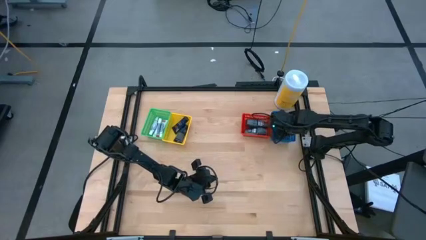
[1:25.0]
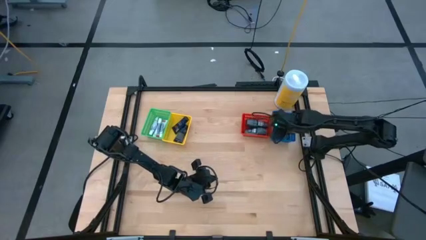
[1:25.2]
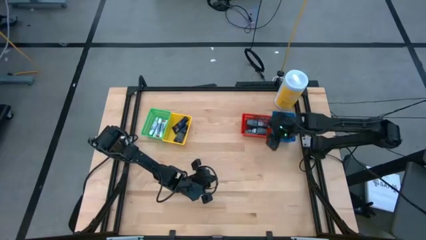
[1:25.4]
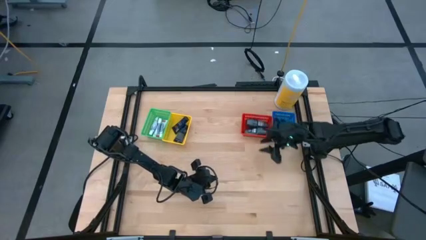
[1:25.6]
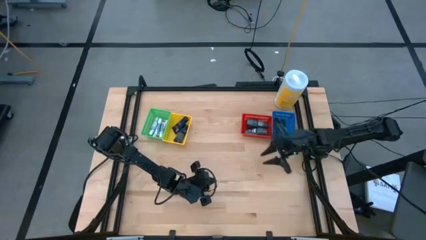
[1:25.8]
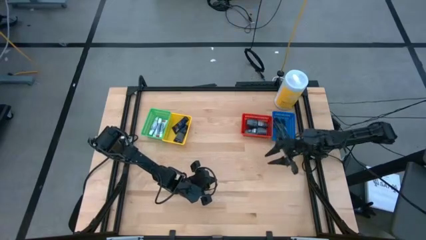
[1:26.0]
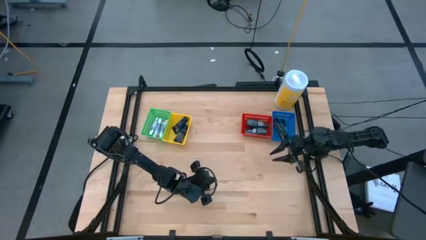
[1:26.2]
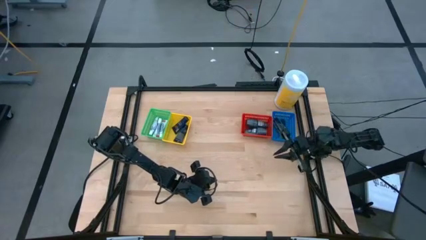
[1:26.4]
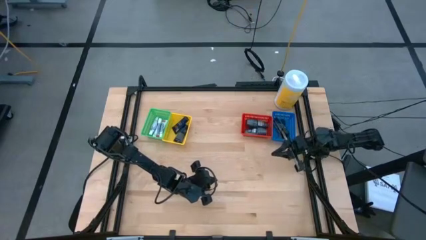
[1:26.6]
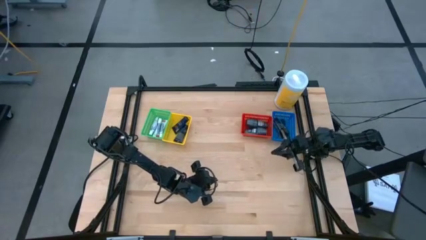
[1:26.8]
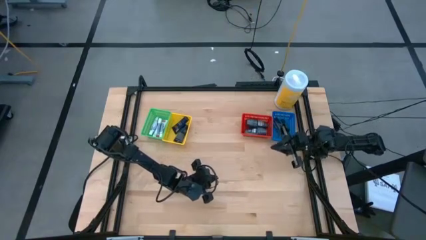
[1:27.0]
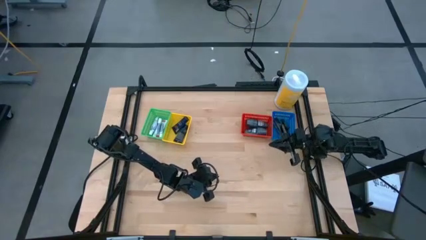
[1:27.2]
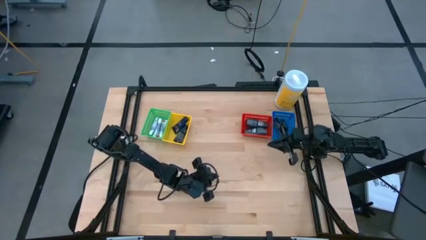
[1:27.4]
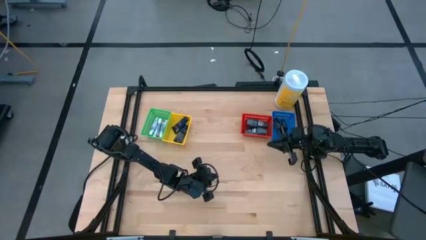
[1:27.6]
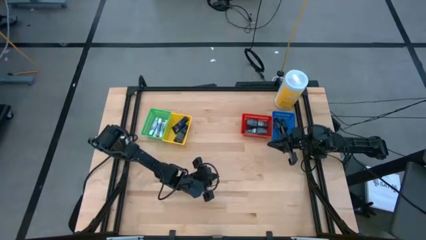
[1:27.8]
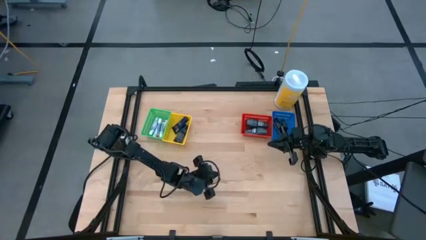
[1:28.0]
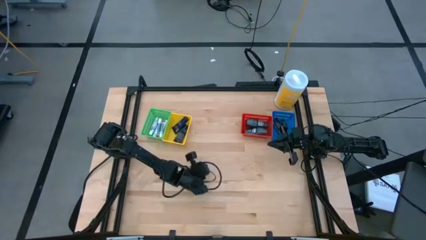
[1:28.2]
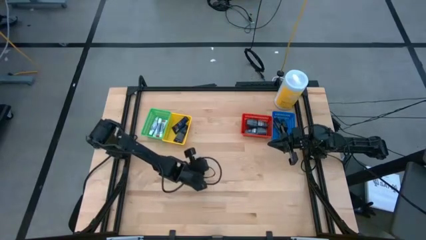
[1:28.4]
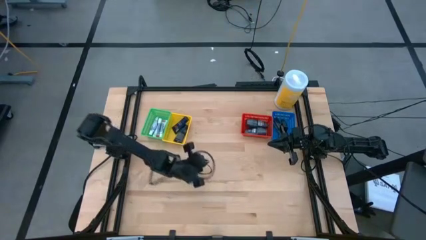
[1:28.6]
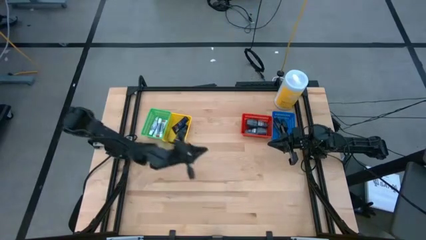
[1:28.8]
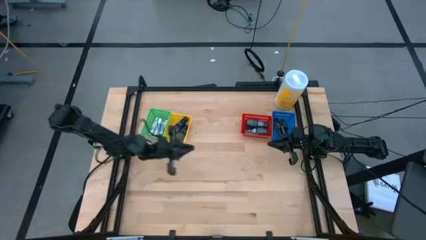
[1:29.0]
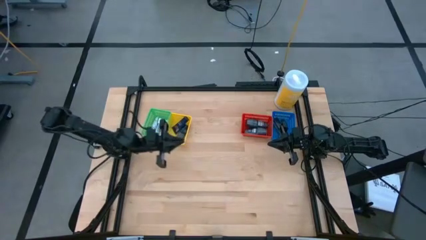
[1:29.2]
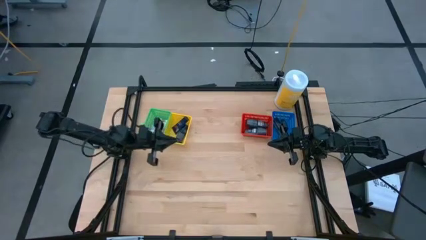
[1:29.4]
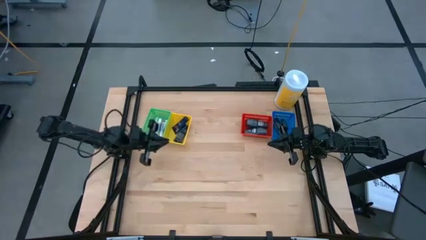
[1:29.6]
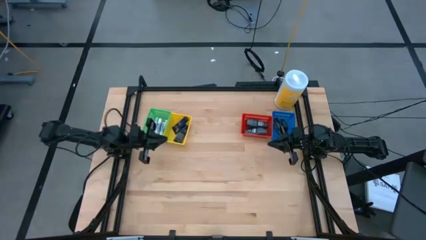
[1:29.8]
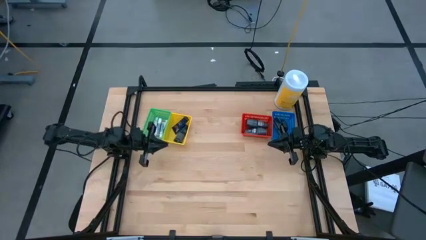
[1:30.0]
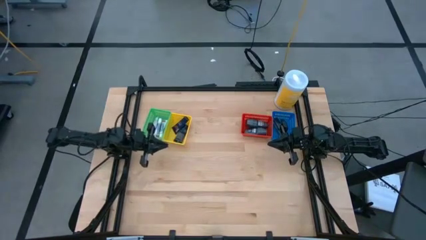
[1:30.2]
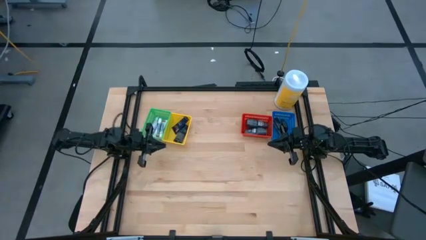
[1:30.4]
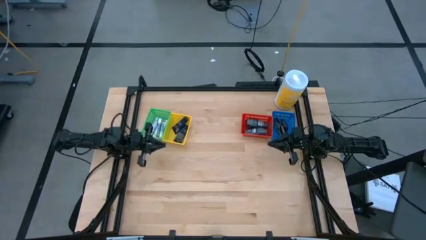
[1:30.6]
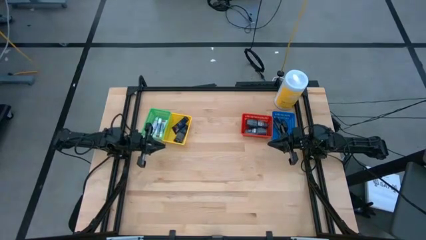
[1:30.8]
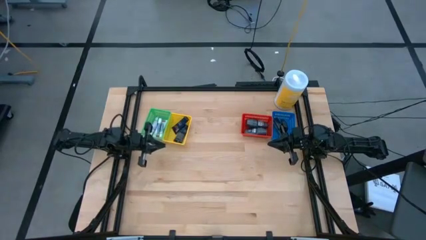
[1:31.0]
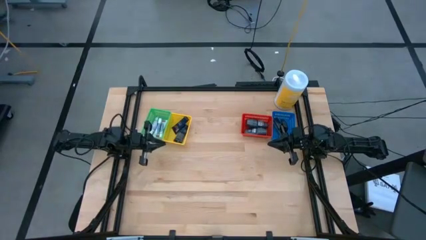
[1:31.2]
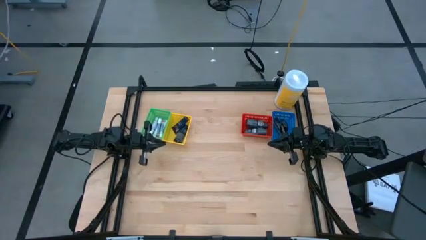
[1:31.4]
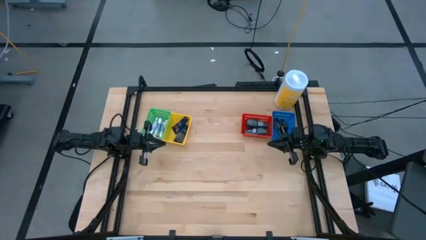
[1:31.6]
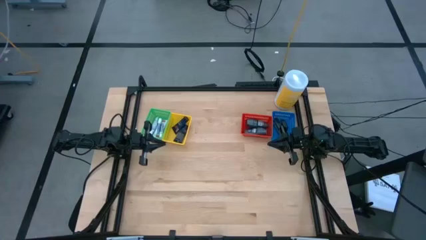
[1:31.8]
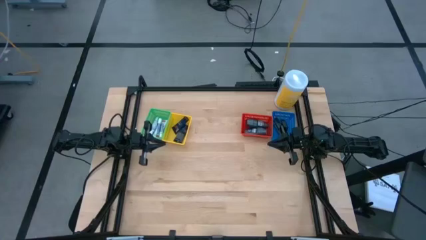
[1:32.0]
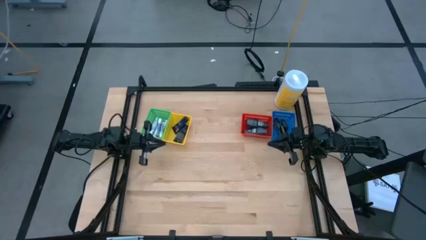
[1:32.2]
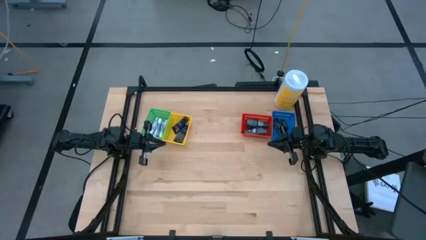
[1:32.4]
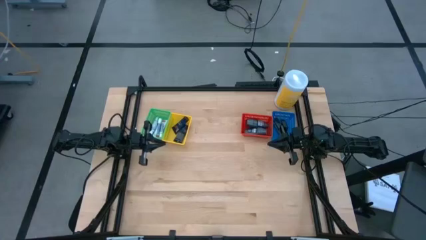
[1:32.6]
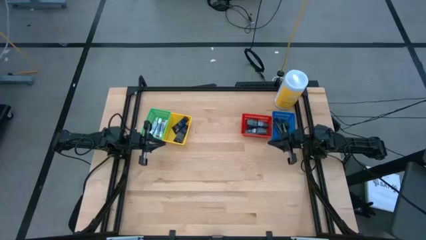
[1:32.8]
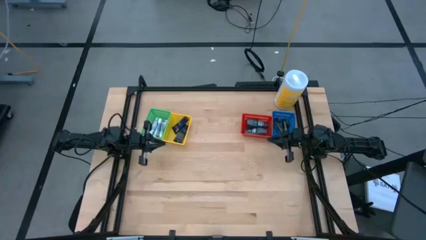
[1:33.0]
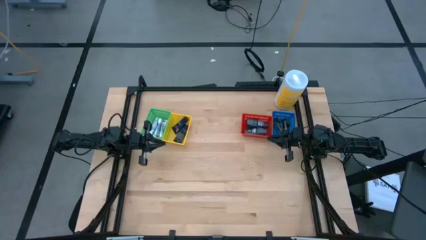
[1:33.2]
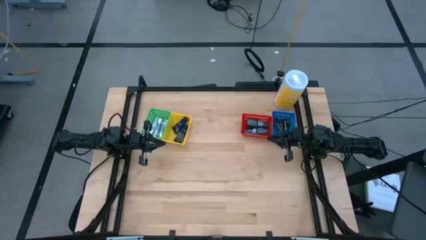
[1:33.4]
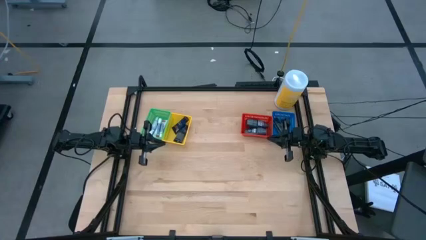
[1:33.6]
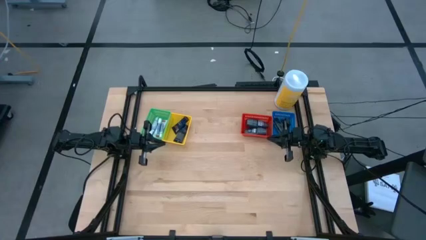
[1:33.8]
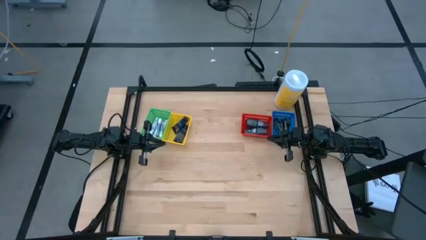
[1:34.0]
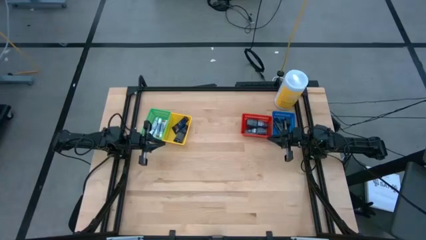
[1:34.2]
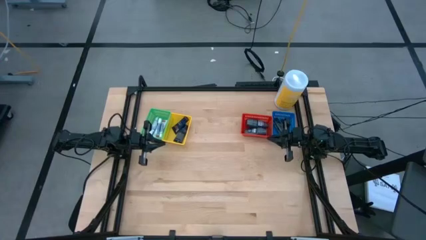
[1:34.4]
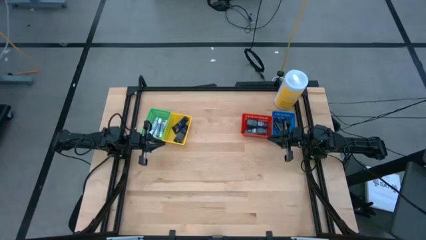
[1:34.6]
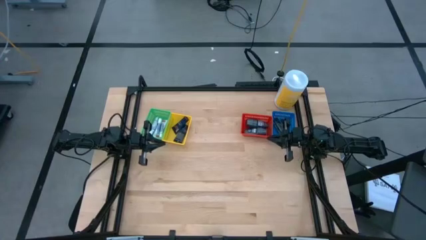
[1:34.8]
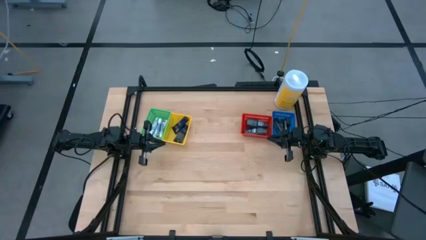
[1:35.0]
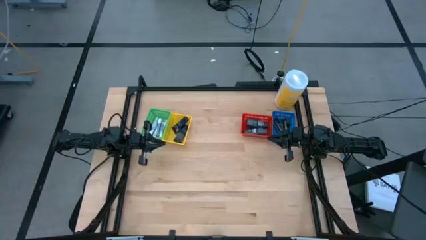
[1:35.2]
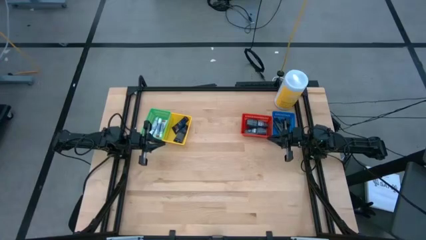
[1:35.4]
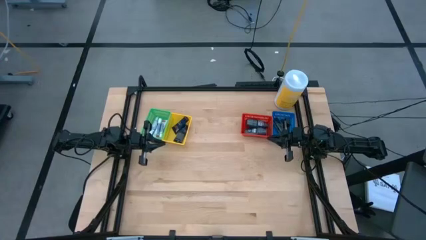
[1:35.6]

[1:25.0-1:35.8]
Task: Pick & Place Travel size toiletries
Return to Home Position
